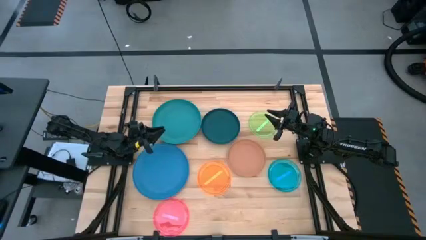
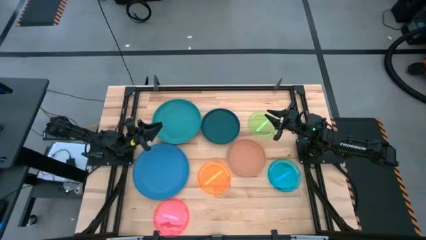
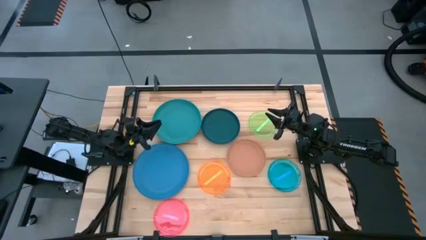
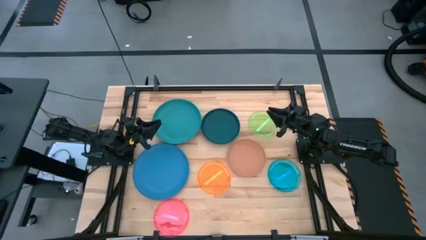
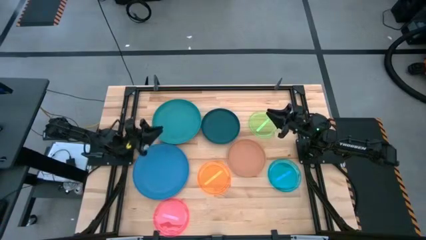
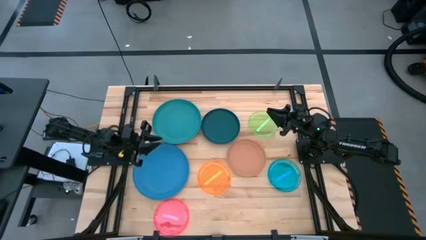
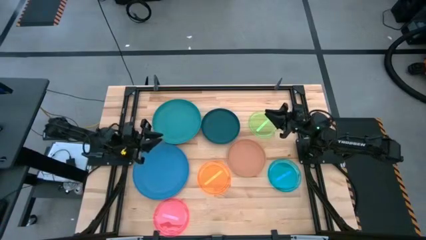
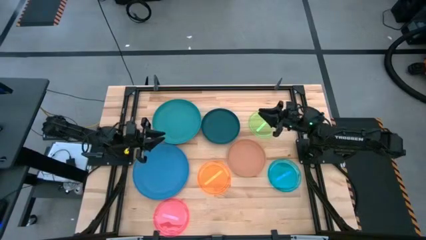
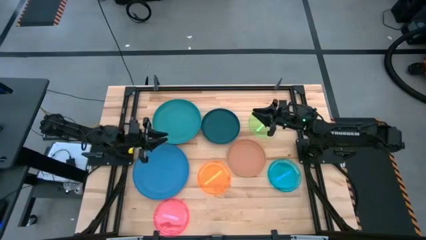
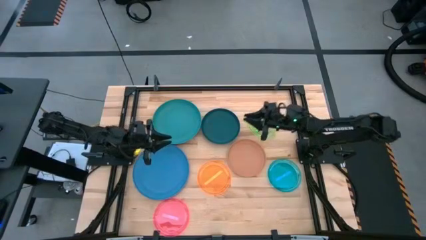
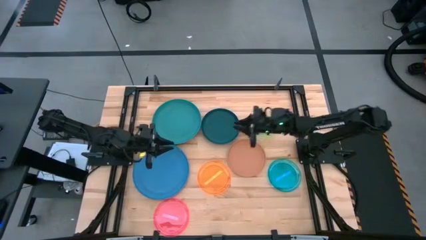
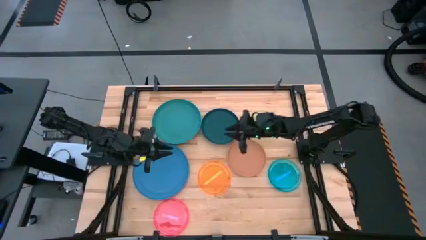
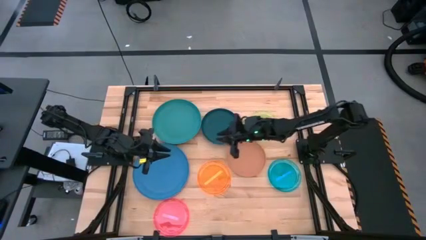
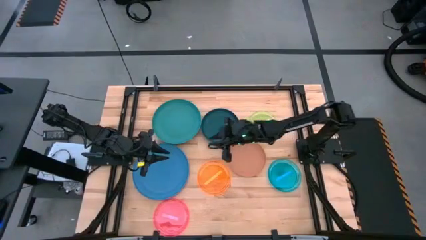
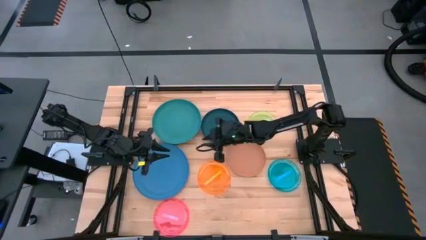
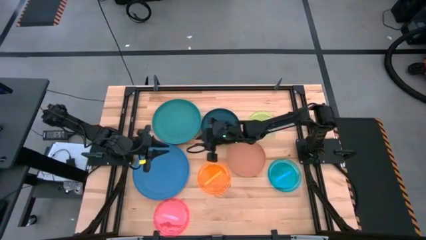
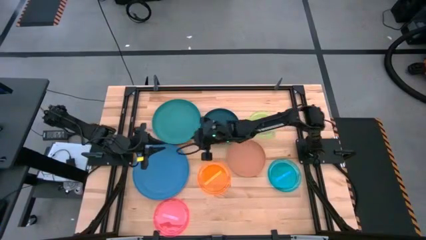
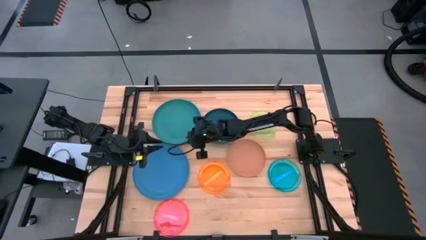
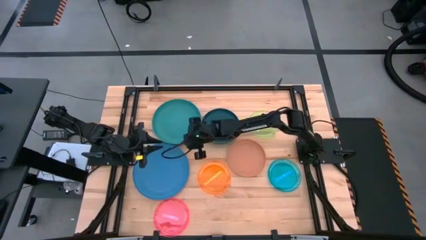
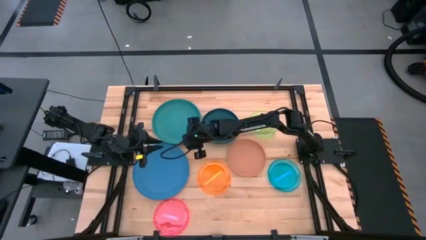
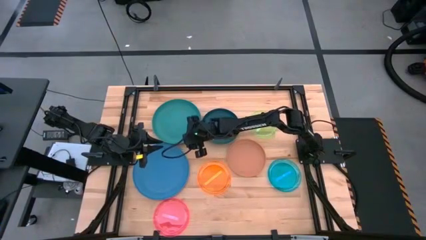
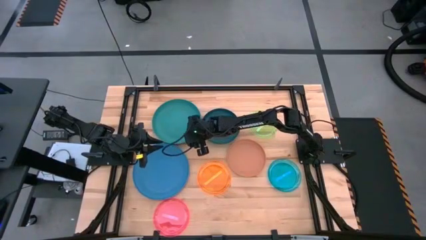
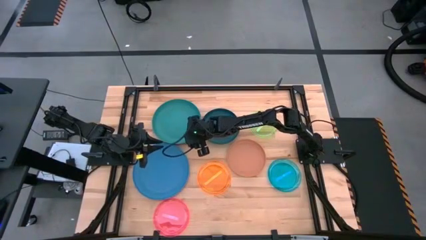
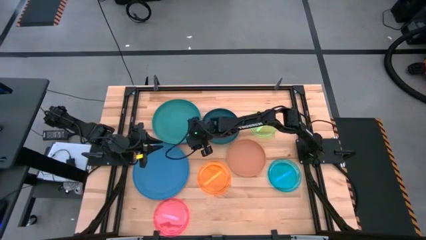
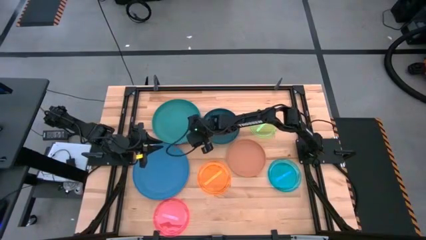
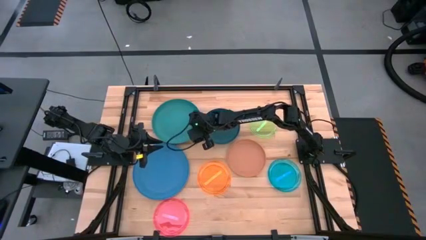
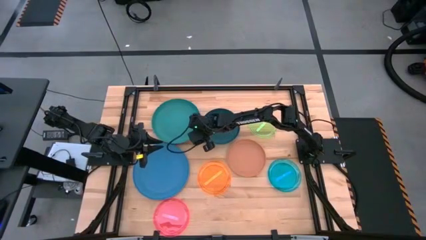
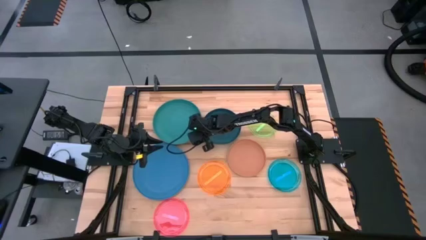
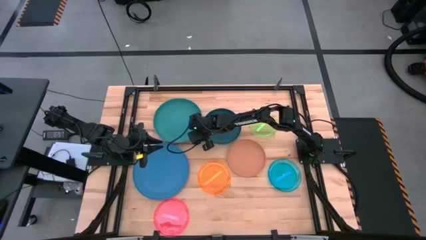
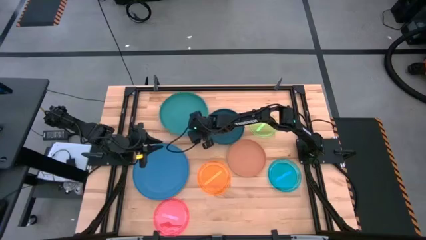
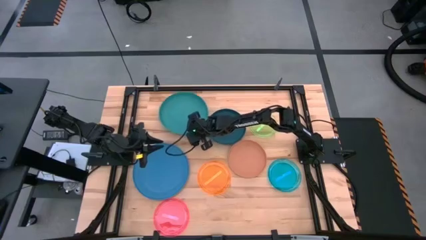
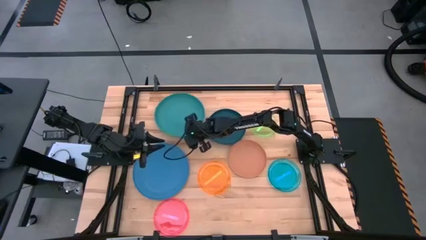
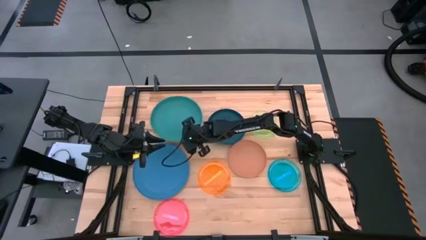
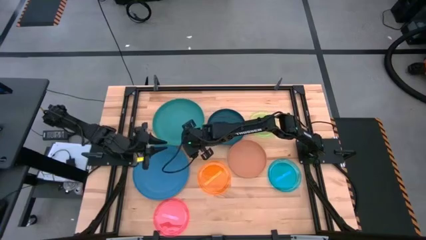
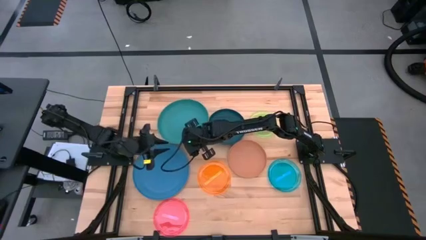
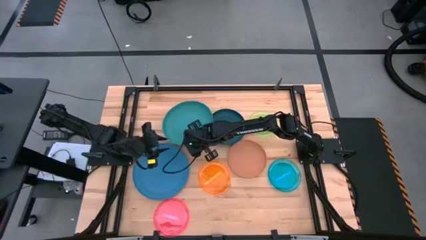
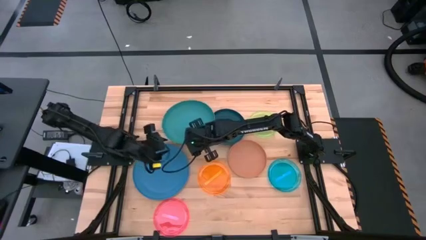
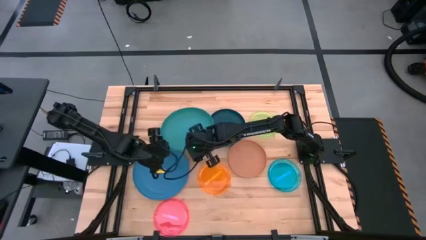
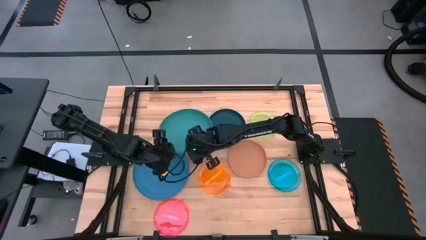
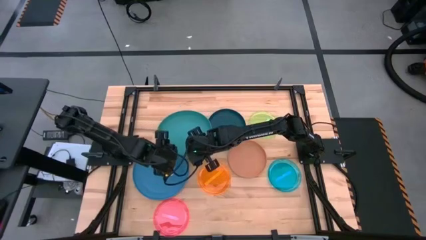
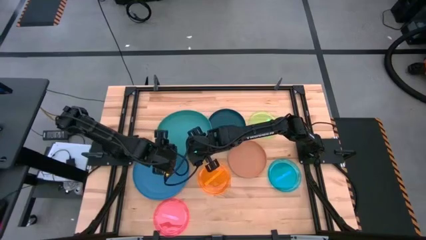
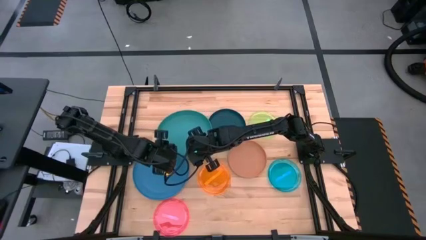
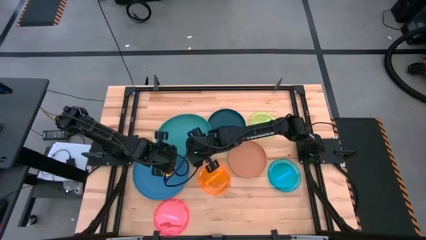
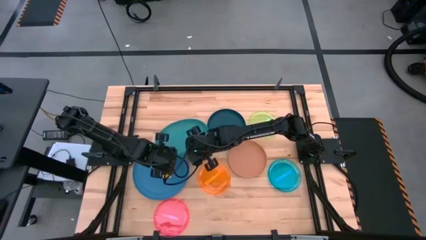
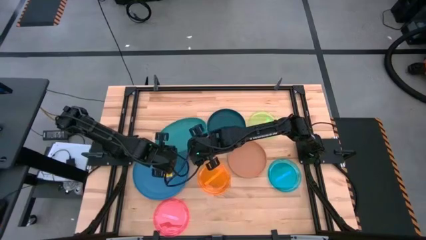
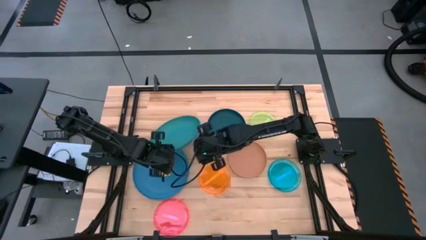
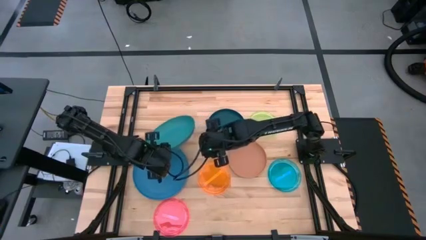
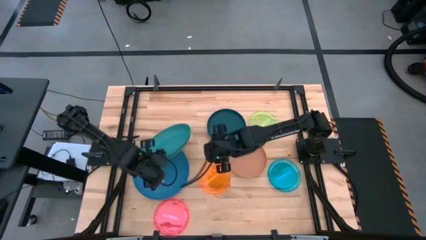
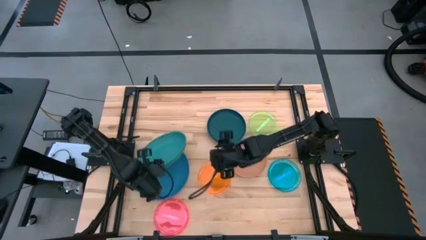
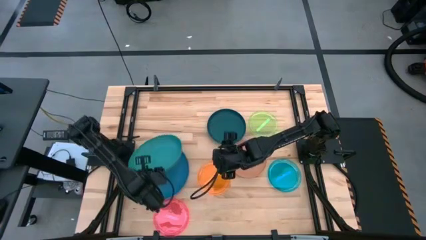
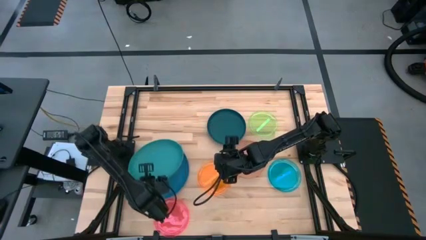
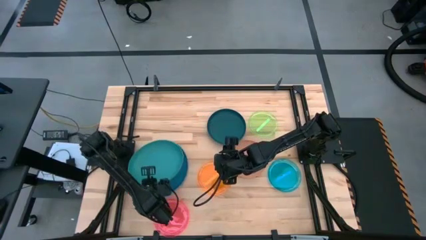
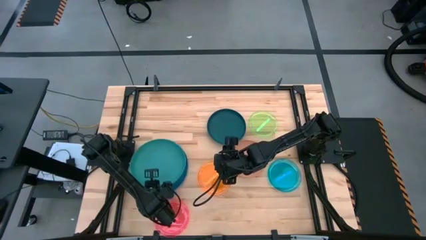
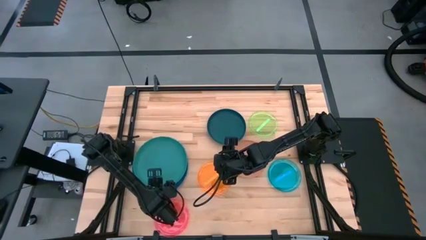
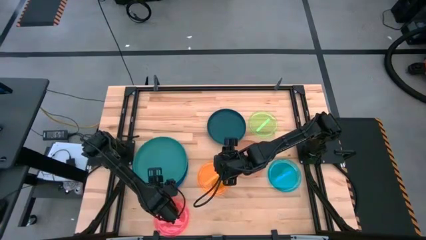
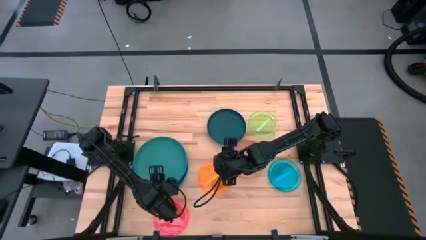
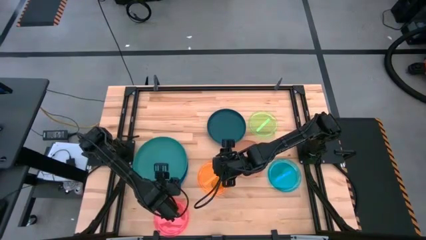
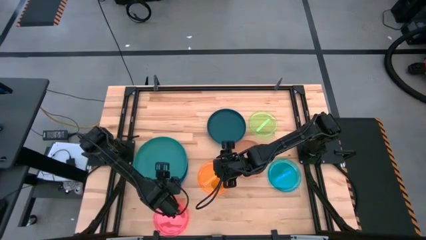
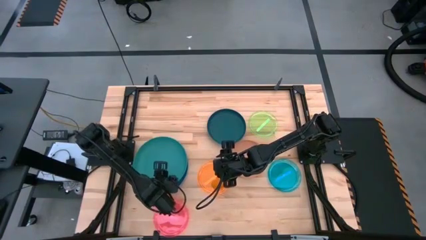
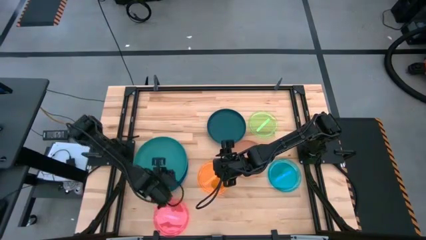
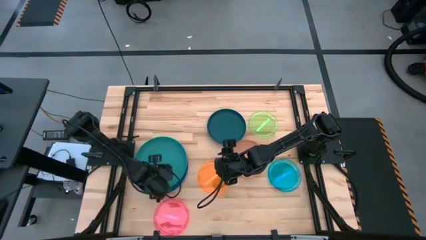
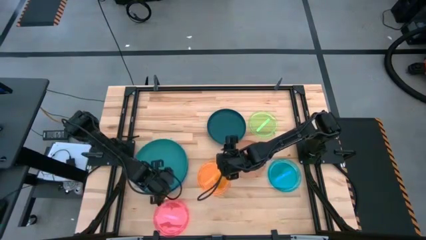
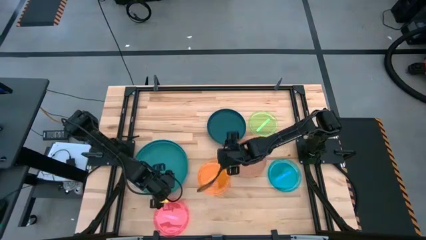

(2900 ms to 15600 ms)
Task: Stack plastic plates
Stack the green plate on top of the blue plate

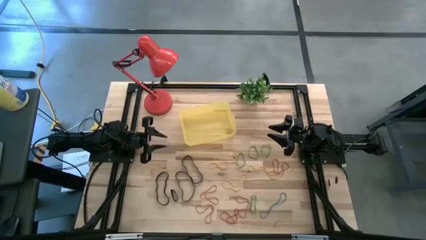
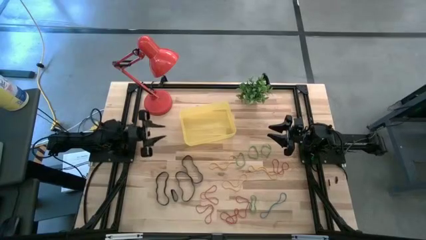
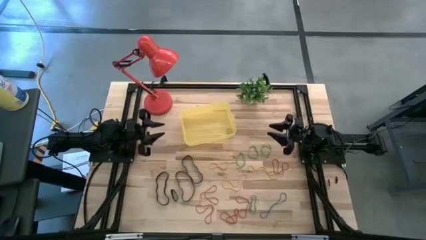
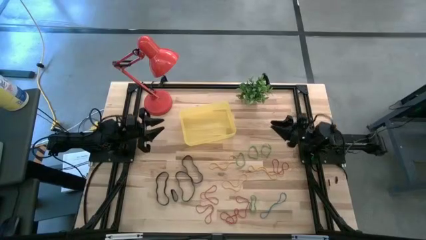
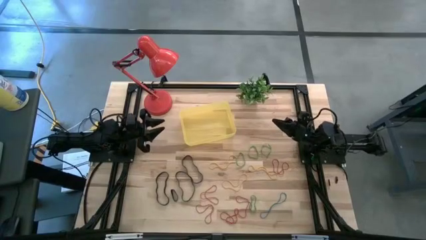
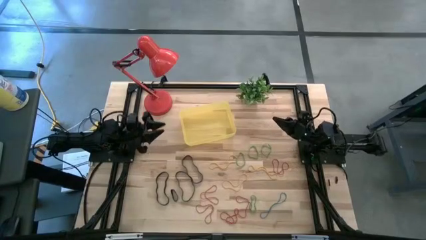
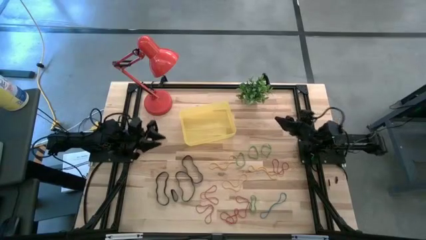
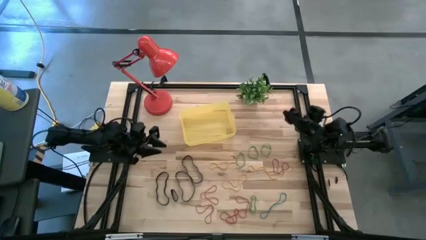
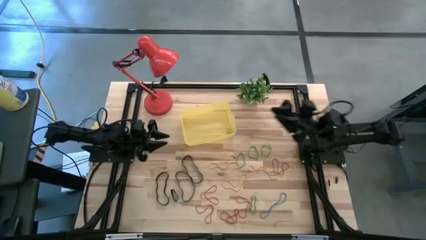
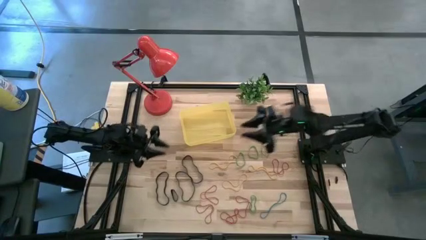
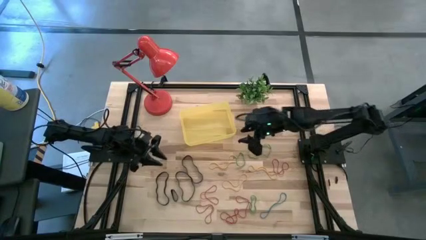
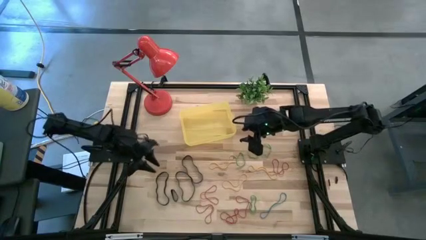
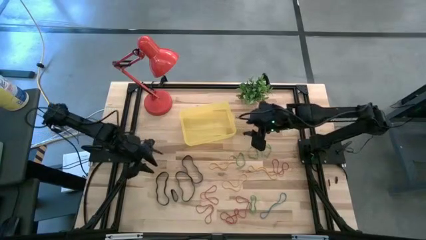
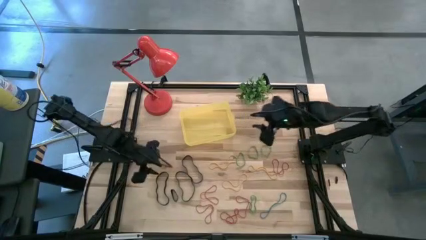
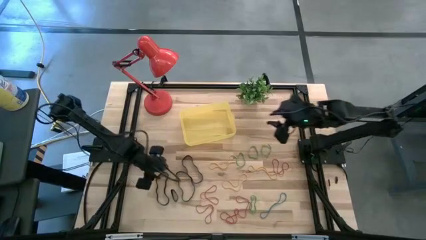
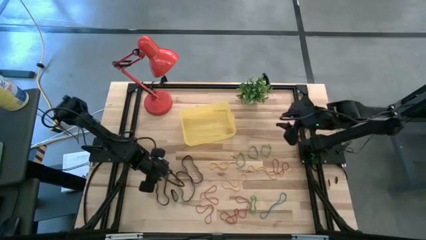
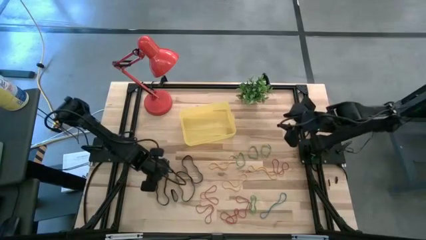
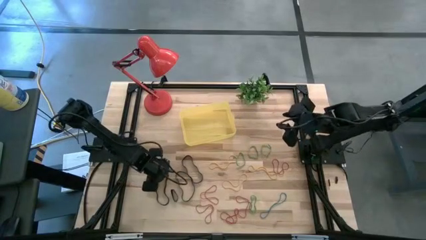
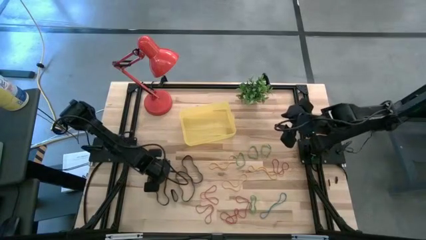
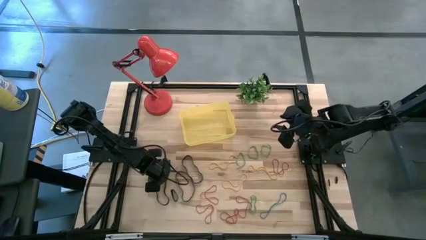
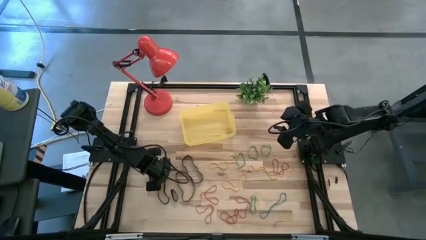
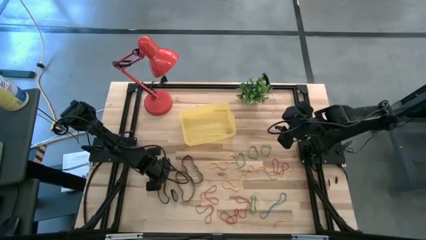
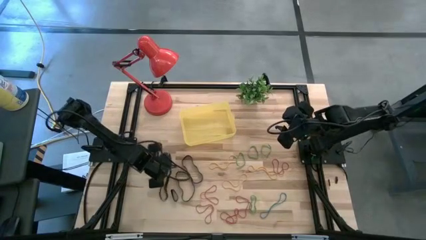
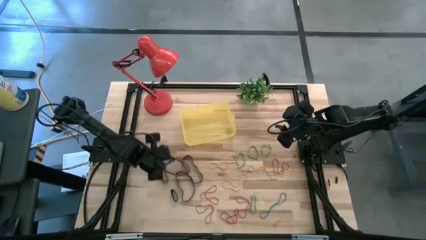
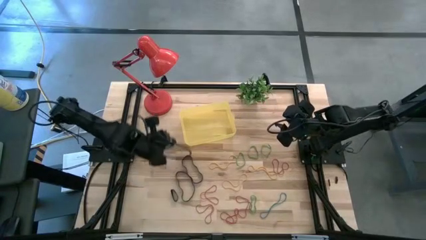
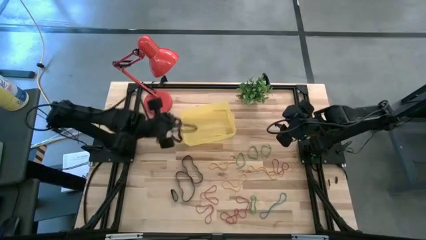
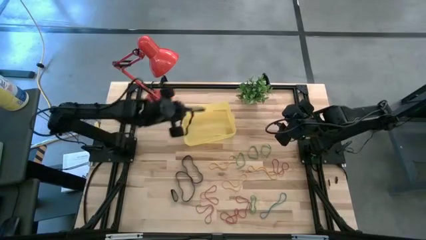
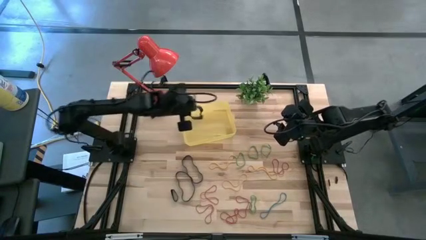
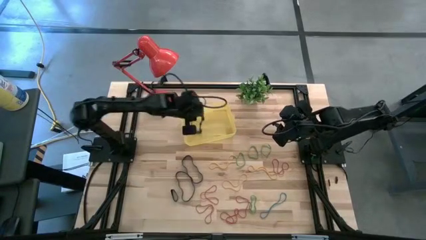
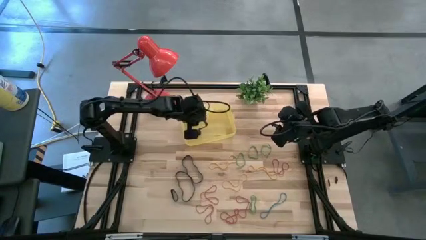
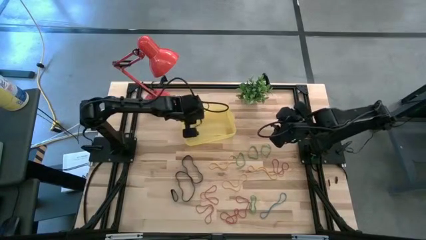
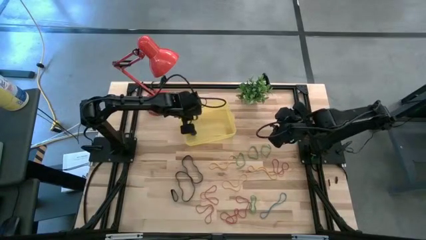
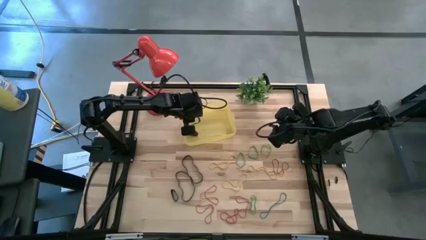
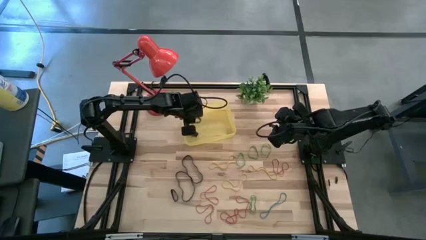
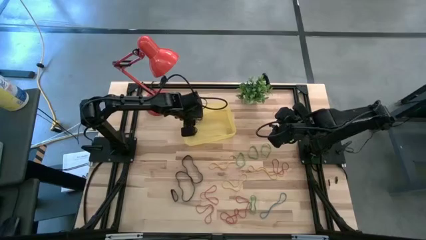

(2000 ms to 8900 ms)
Task: Pick and place rubber bands into bin
Put the black rubber band into the yellow bin
